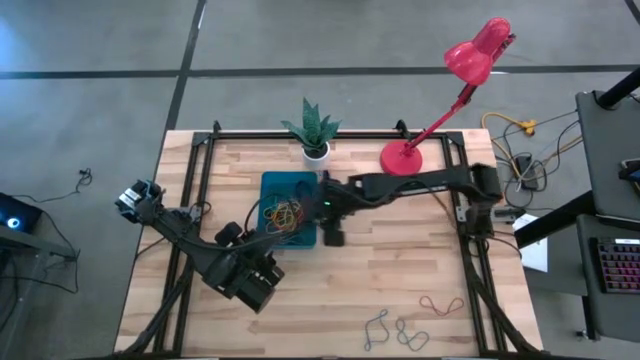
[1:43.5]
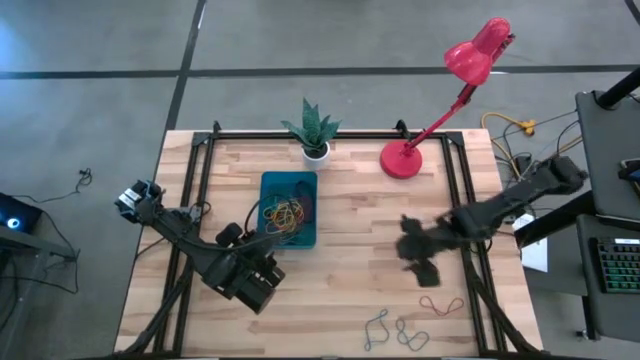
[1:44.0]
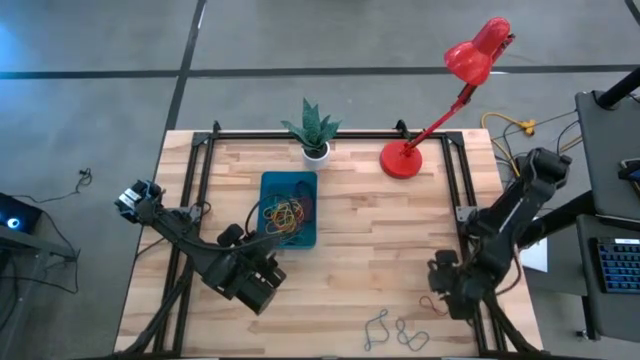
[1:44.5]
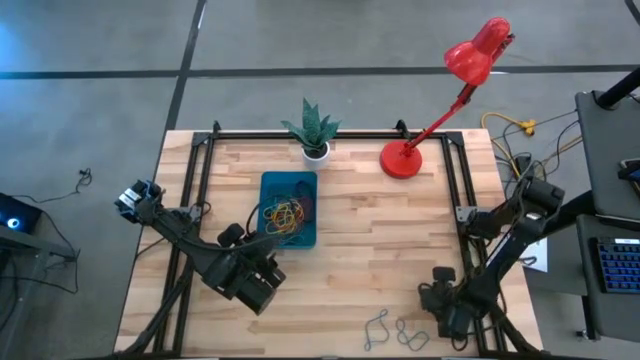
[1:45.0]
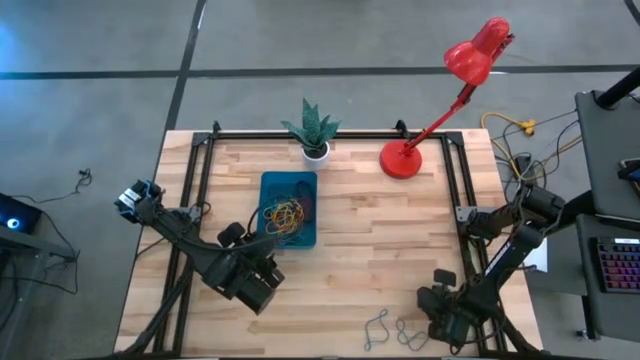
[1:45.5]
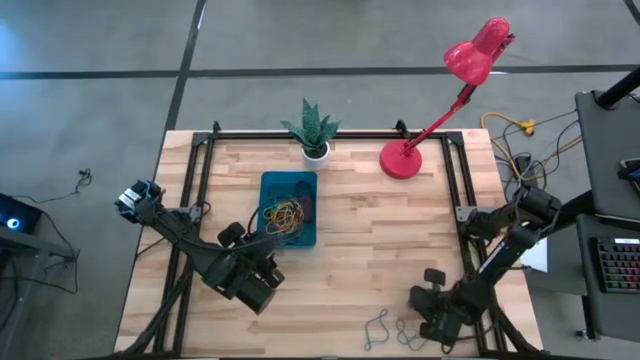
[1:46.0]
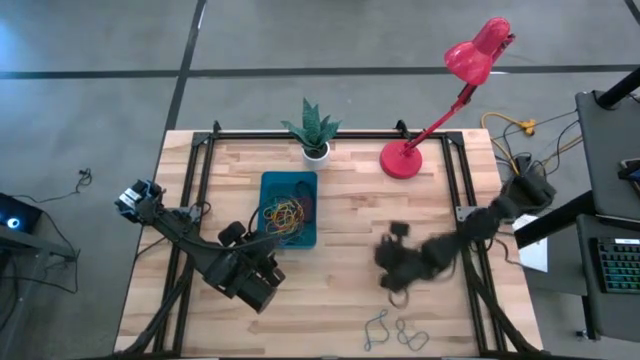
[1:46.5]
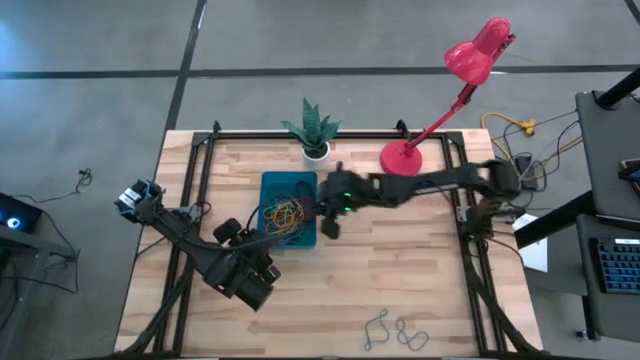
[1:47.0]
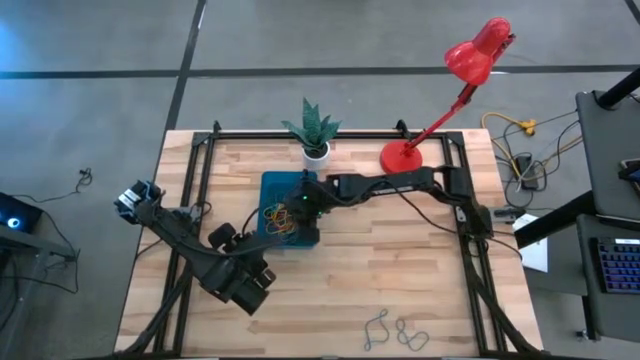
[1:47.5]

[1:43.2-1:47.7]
Task: Pick and place rubber bands into bin
Put the orange rubber band into the blue bin

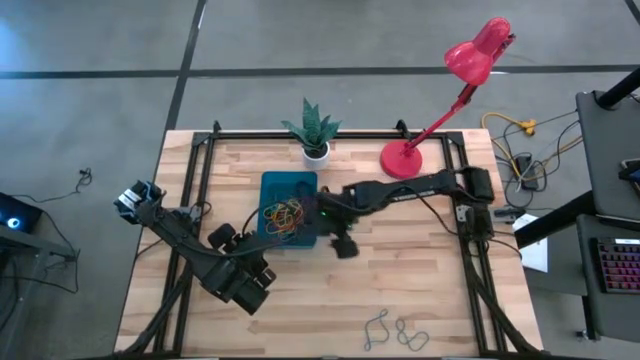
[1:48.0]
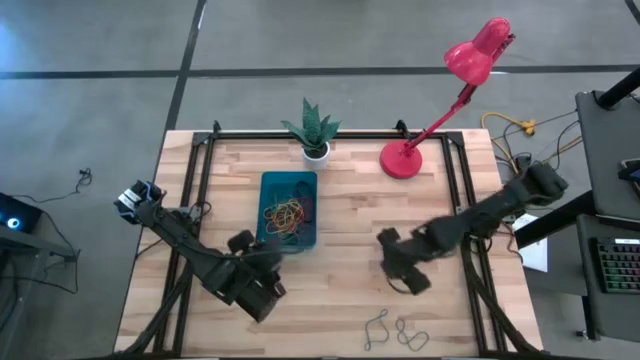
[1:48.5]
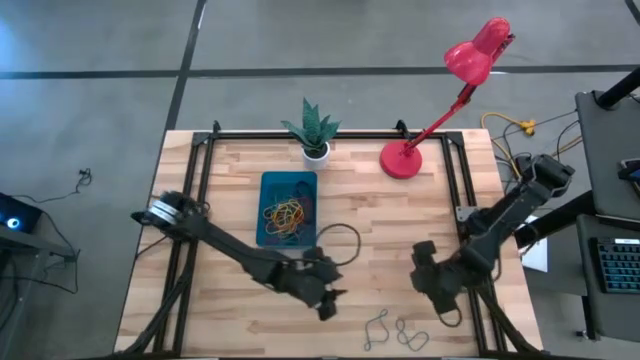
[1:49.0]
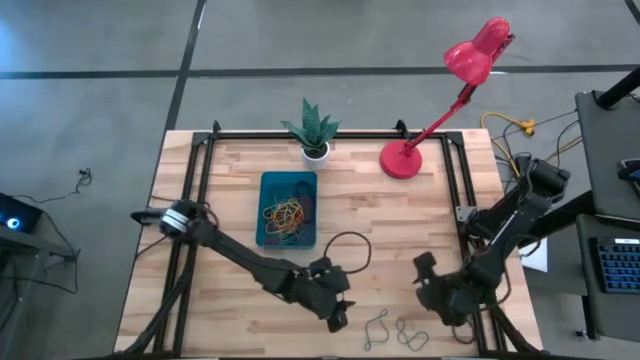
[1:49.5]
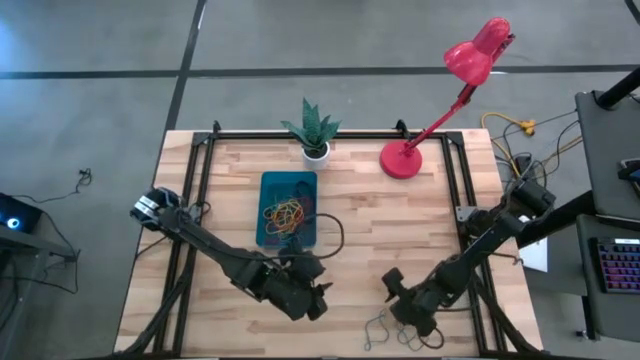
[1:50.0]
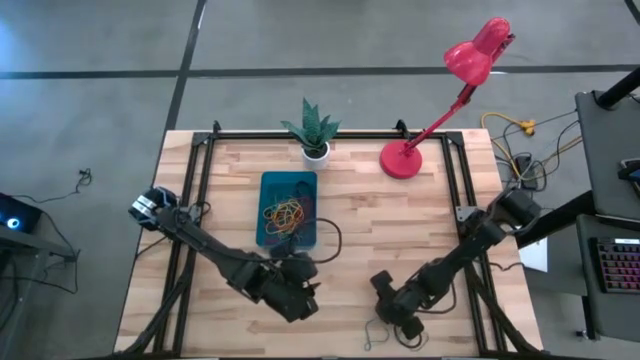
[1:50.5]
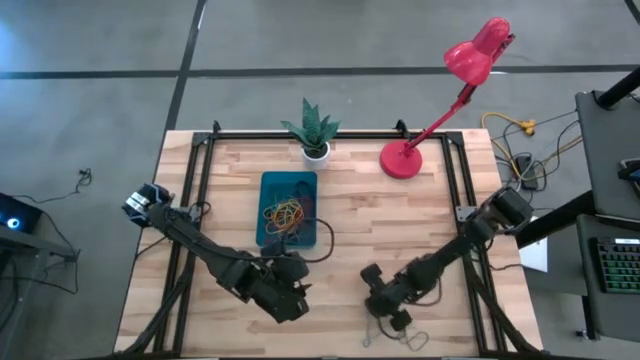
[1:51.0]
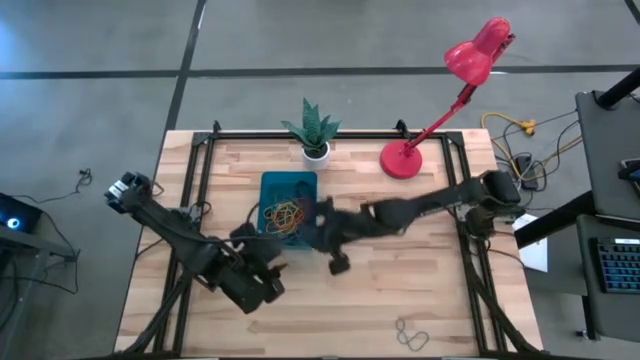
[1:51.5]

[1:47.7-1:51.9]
Put the blue rubber band into the blue bin

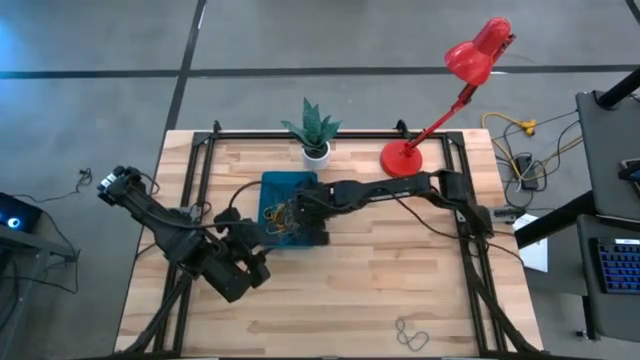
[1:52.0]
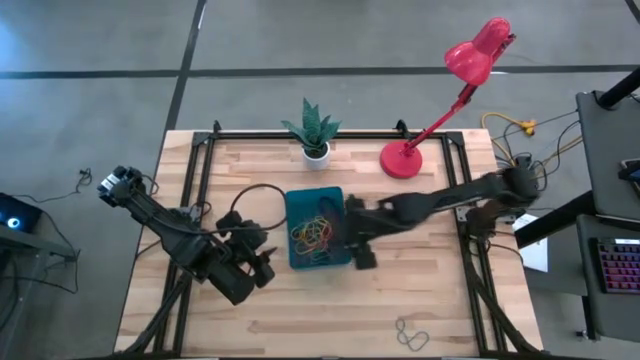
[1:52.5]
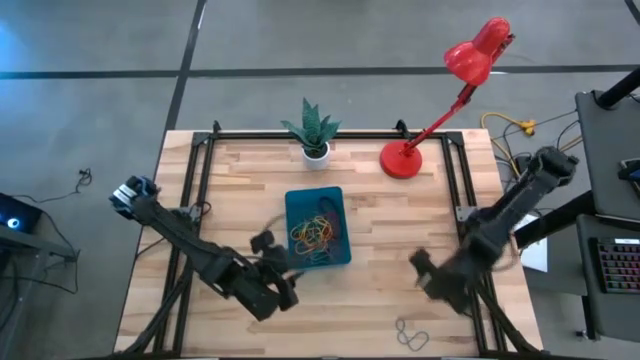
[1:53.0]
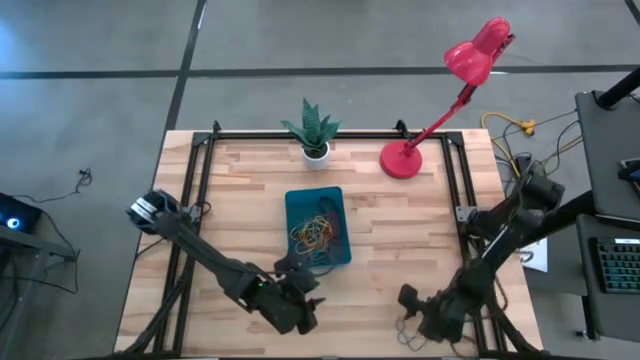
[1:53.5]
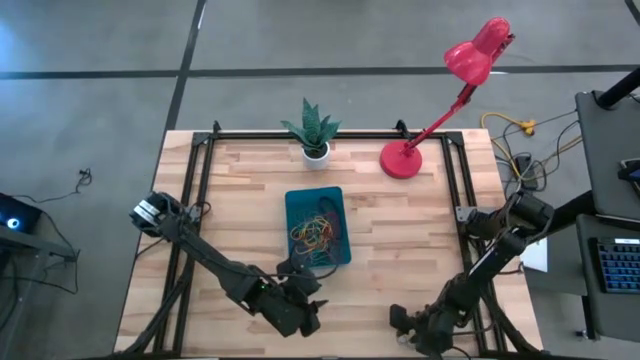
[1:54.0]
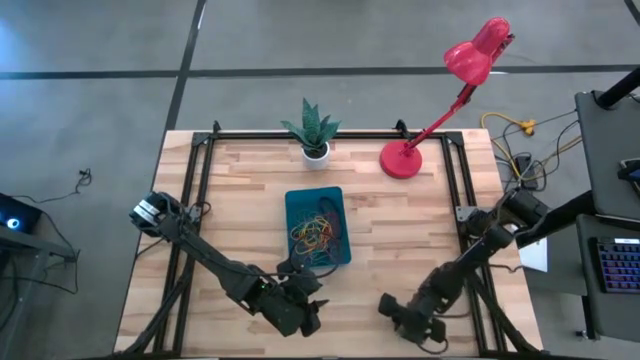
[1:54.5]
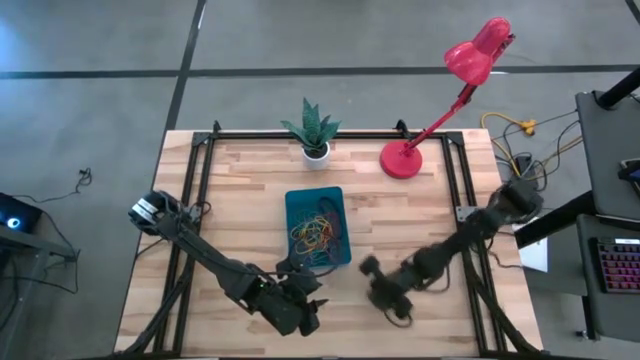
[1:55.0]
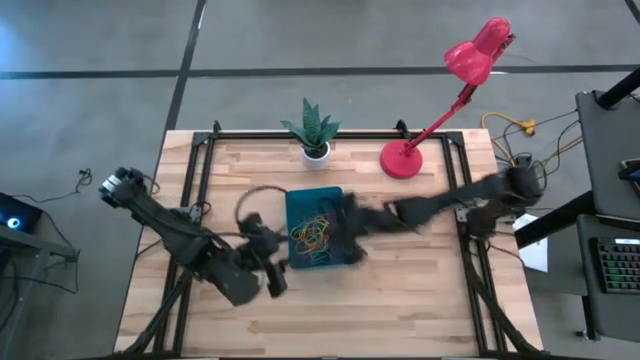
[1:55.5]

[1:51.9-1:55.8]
Put the blue rubber band into the blue bin

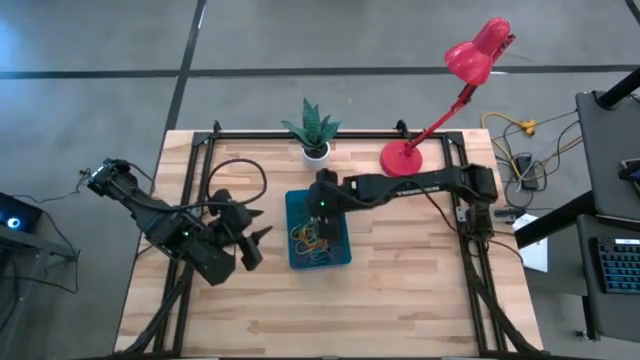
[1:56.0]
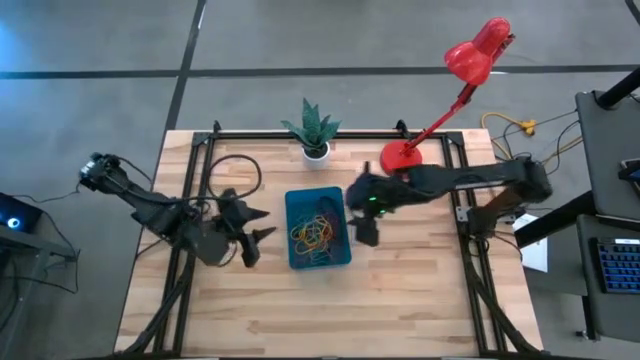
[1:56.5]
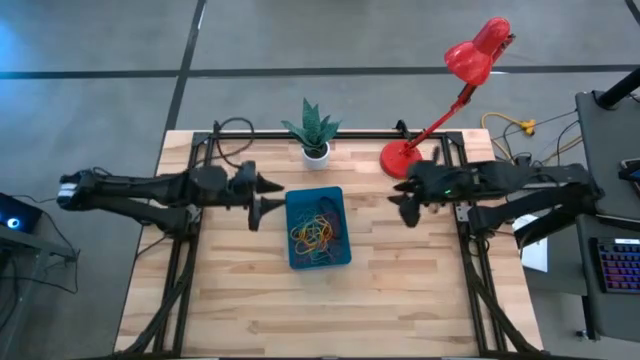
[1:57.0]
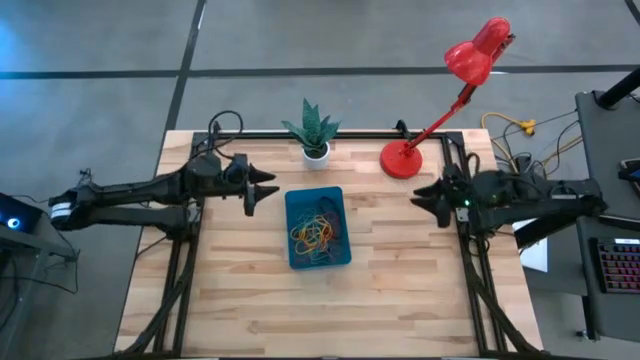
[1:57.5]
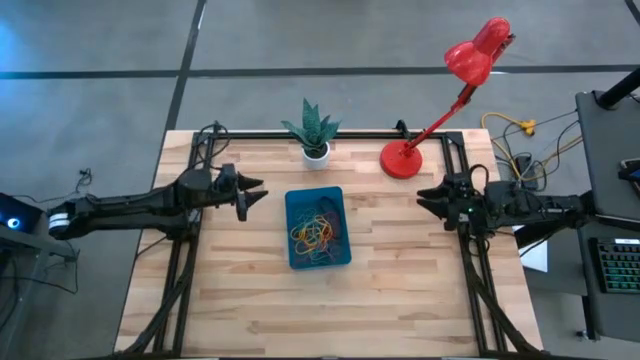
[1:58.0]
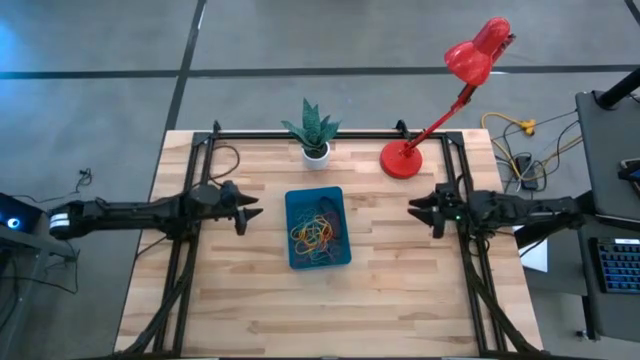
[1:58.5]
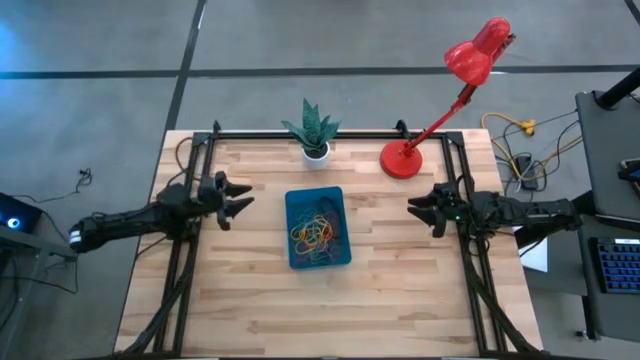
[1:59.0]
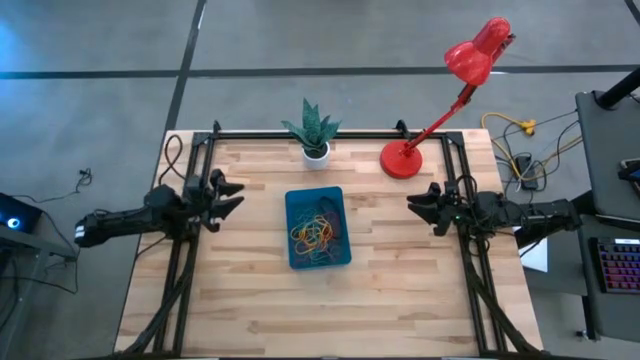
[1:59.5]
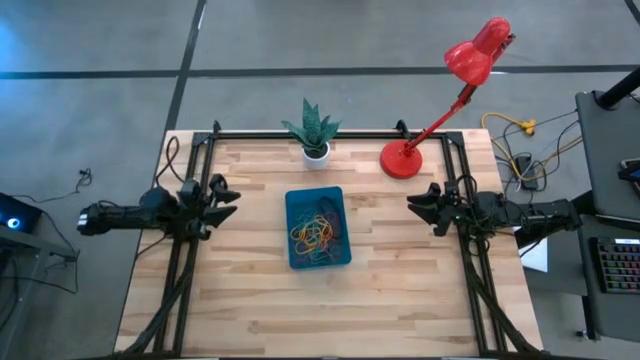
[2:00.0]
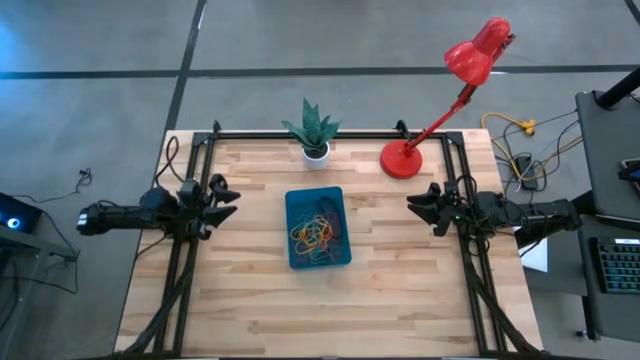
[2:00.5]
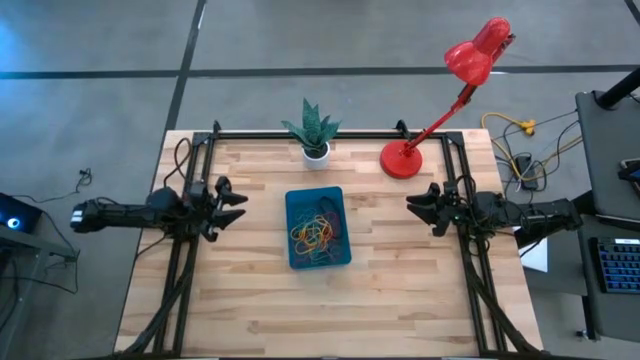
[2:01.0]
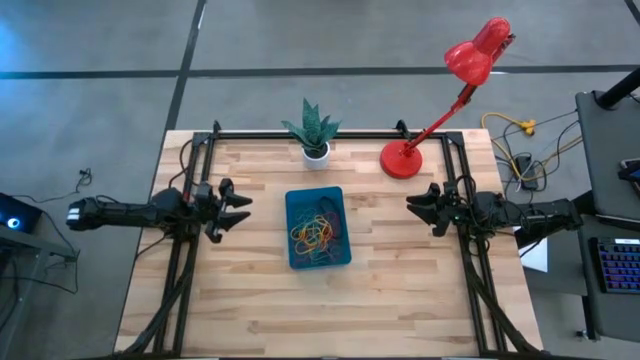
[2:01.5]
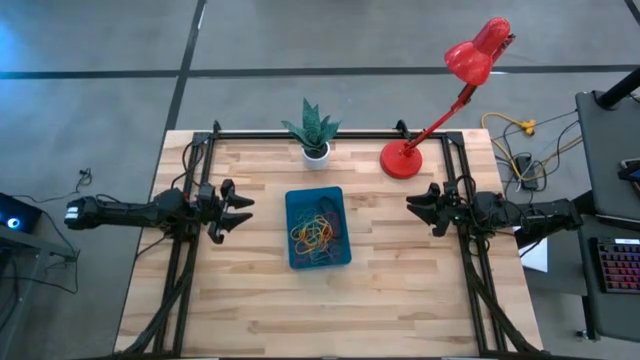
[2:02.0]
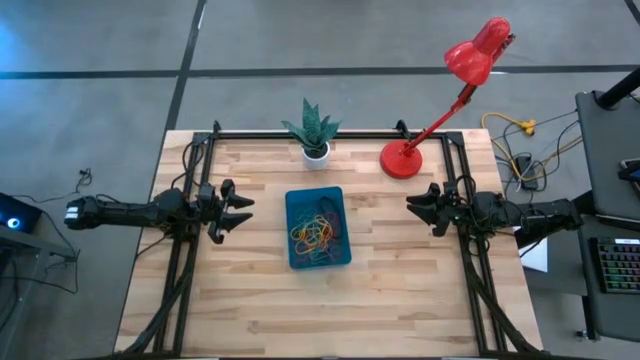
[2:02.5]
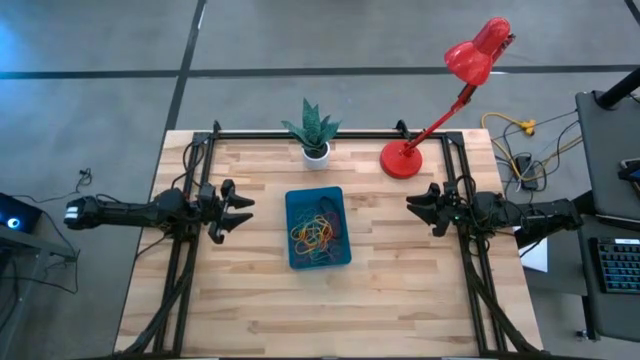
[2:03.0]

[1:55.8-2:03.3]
Return to Home Position

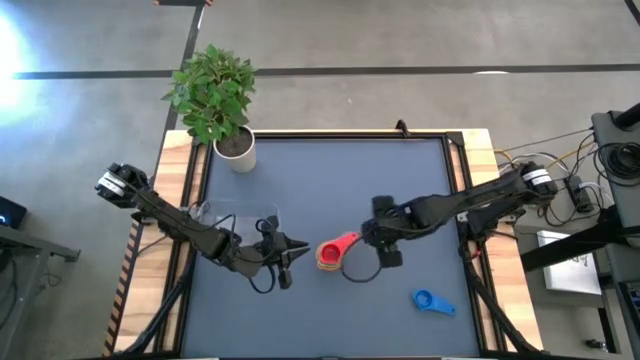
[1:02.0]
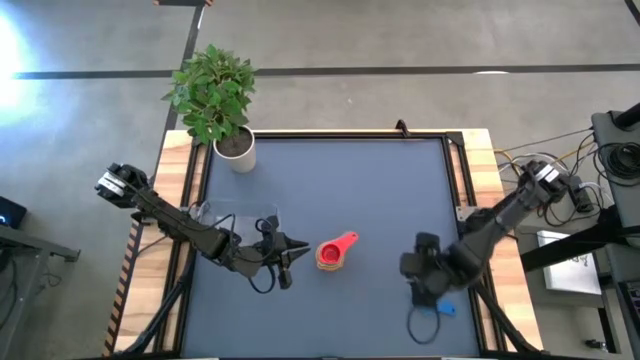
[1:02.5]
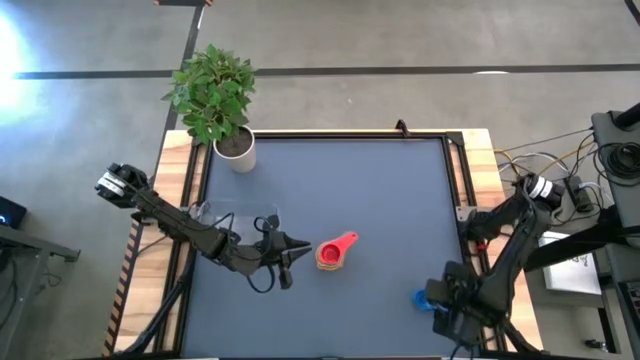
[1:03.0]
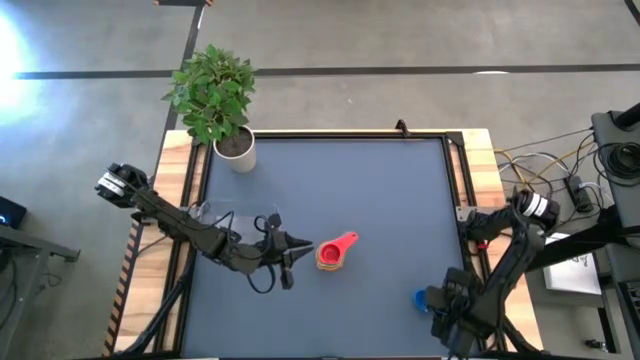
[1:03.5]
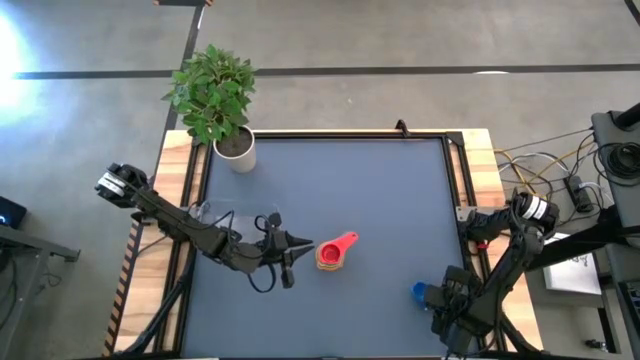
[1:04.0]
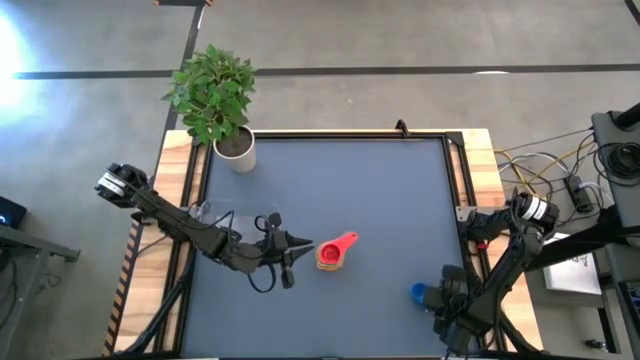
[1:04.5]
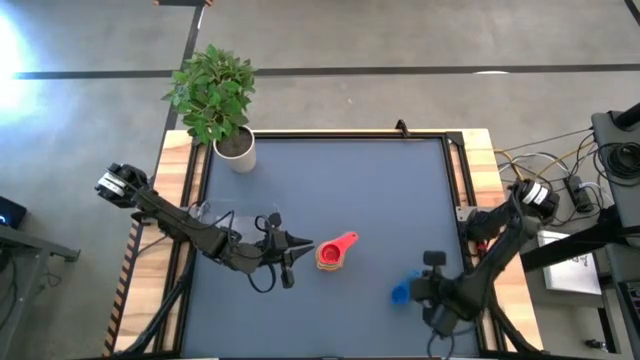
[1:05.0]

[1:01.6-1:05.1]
Task: Nest measuring cups in basket
Stack the blue measuring cup on top of the orange measuring cup
